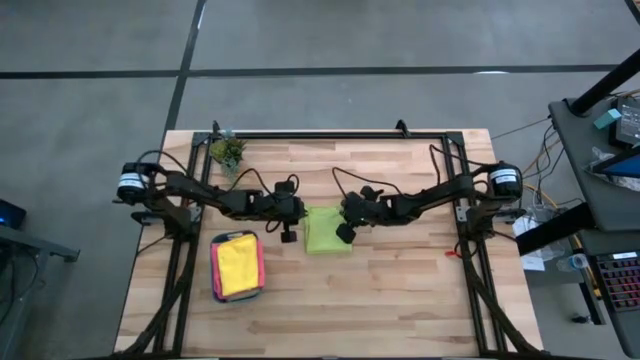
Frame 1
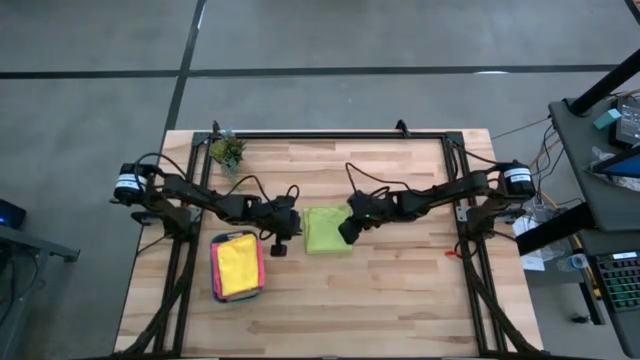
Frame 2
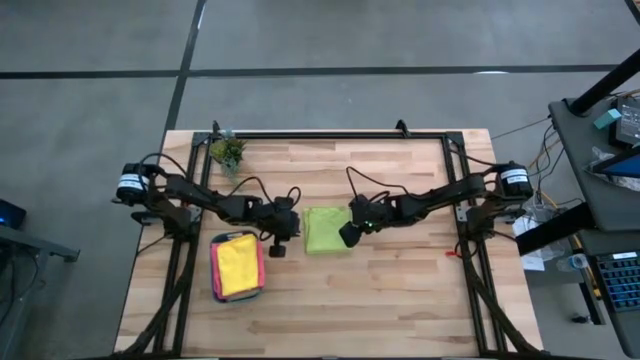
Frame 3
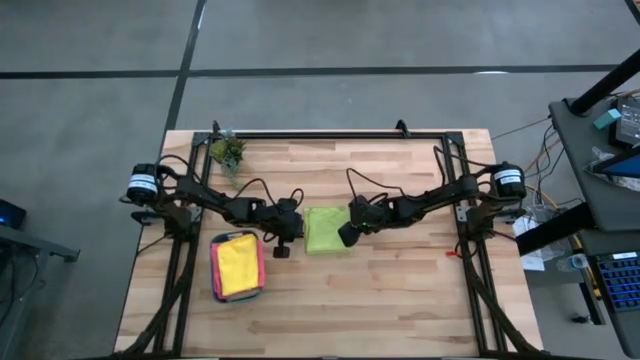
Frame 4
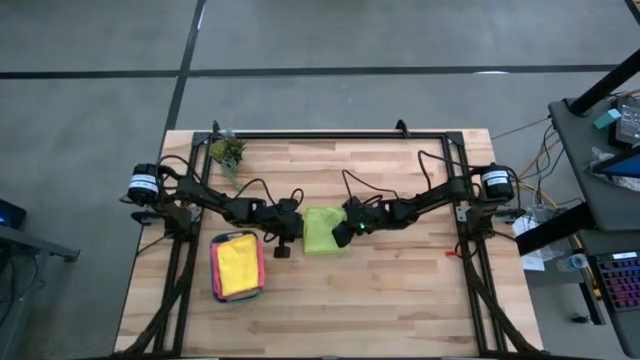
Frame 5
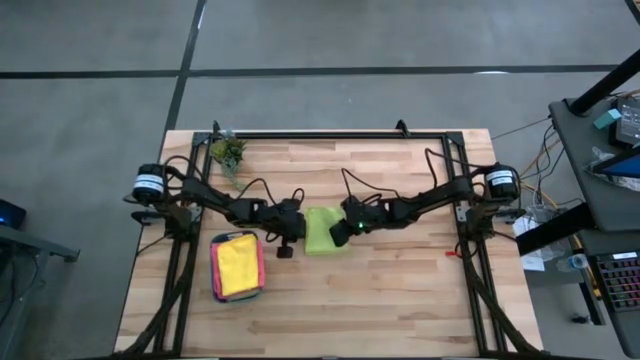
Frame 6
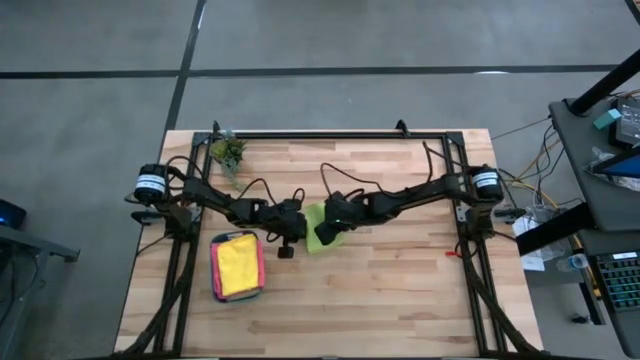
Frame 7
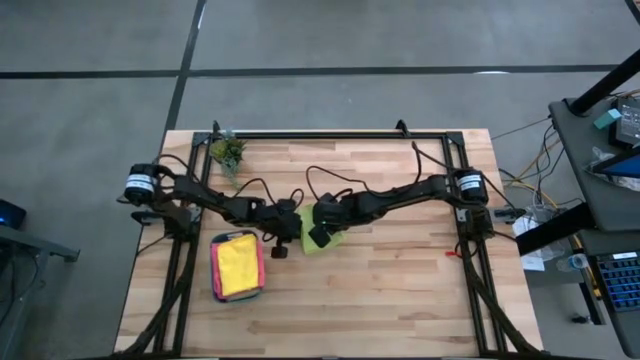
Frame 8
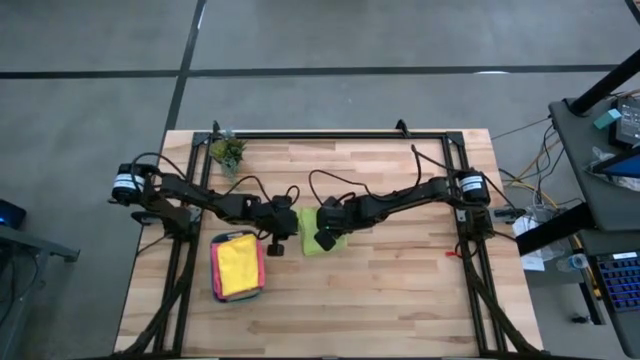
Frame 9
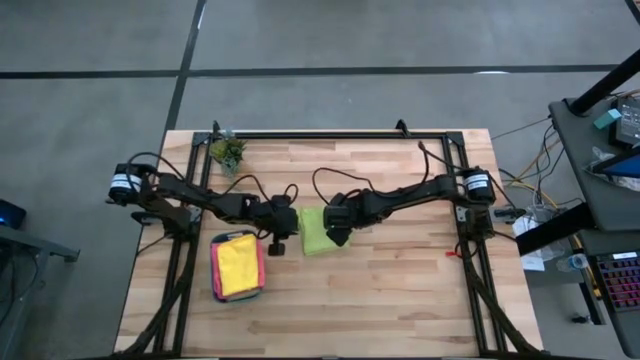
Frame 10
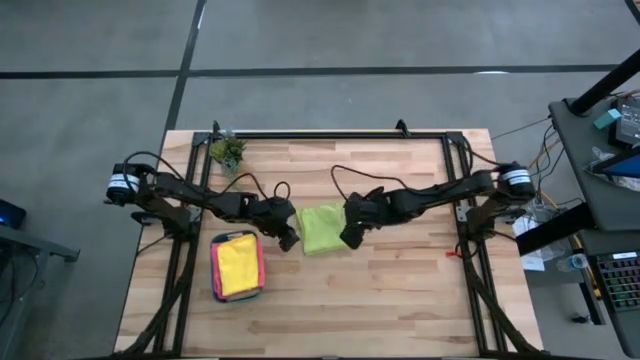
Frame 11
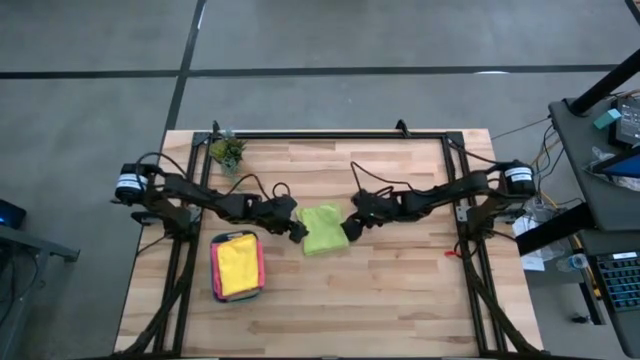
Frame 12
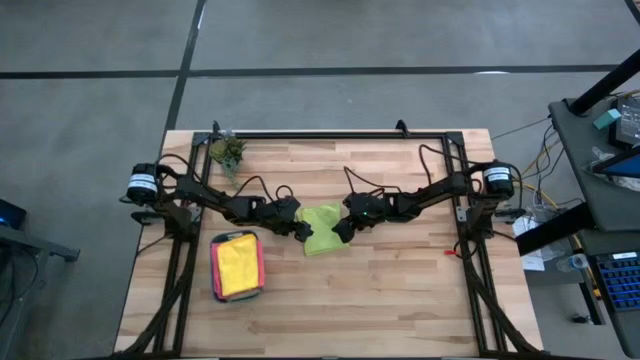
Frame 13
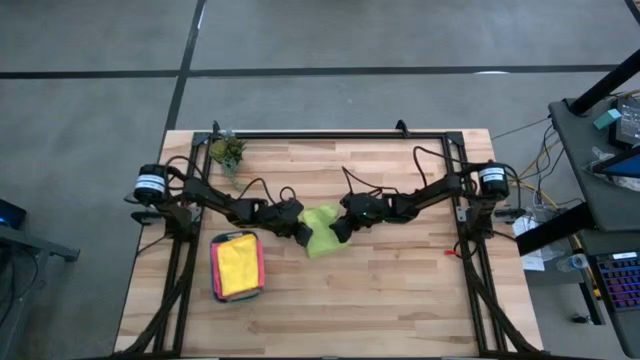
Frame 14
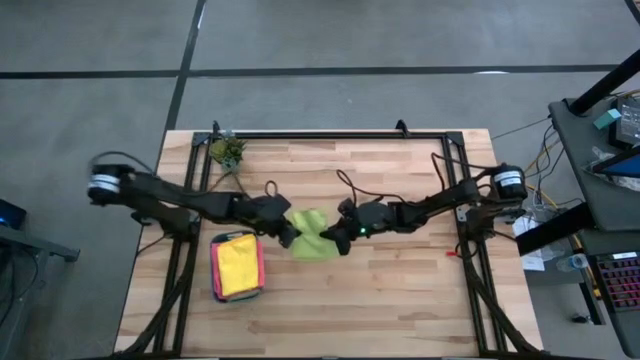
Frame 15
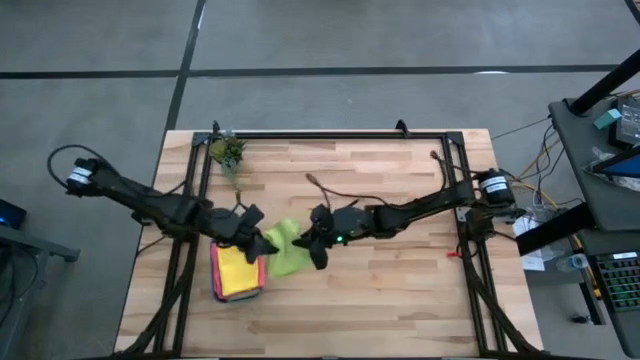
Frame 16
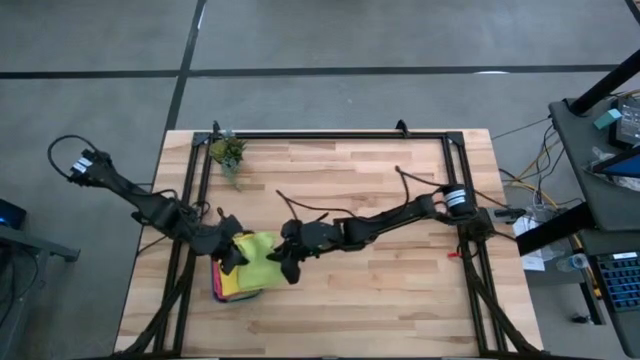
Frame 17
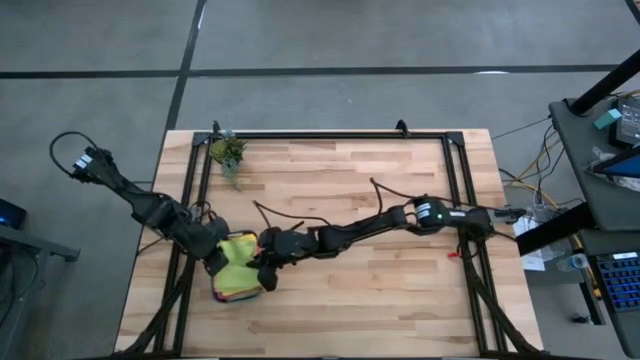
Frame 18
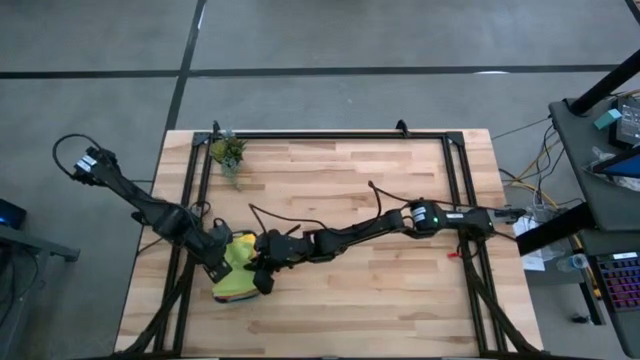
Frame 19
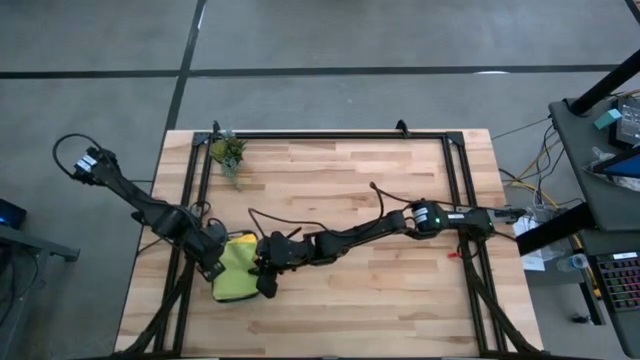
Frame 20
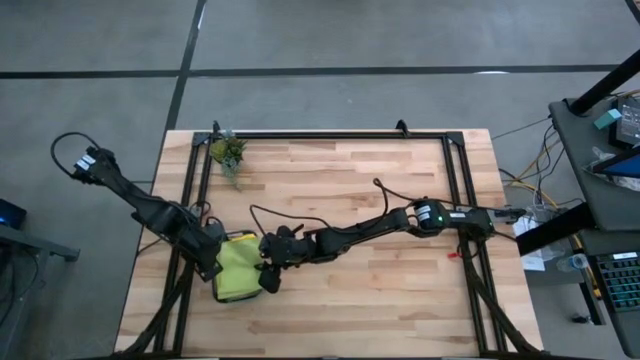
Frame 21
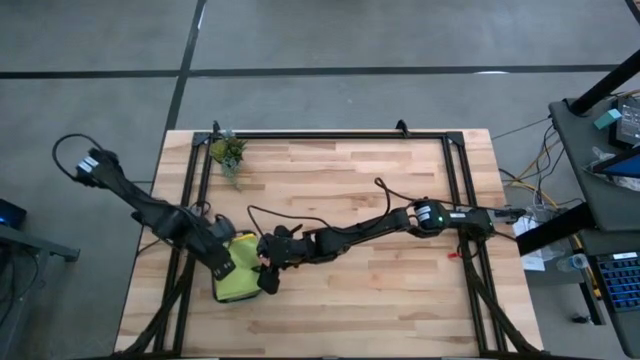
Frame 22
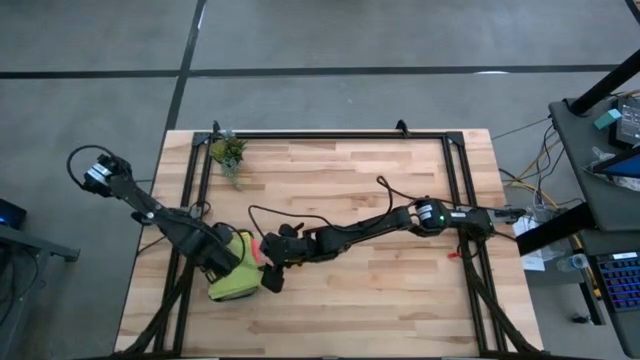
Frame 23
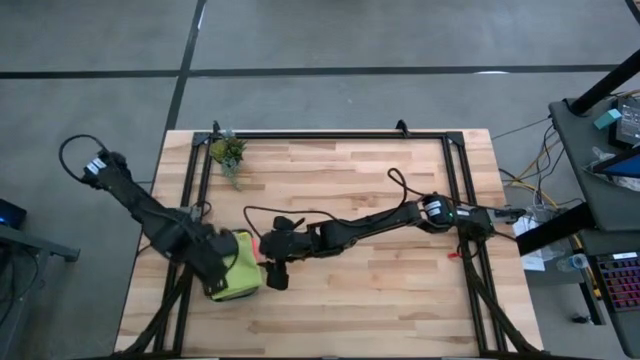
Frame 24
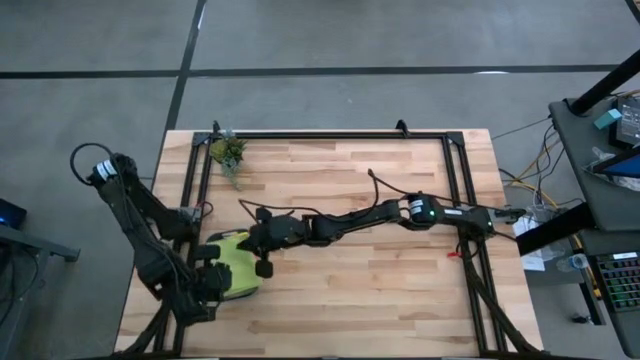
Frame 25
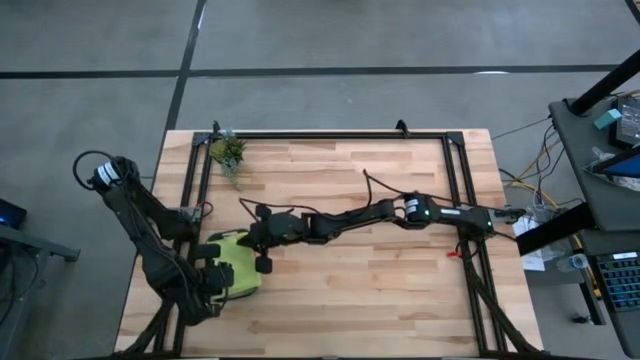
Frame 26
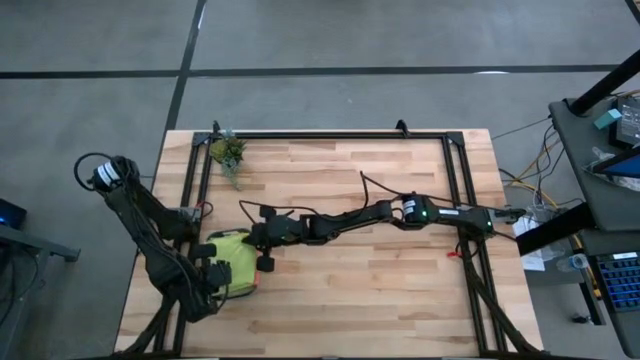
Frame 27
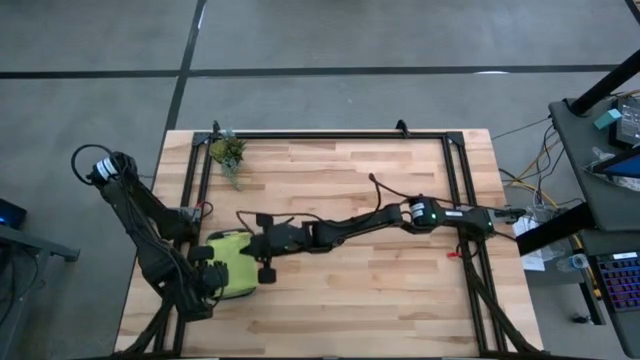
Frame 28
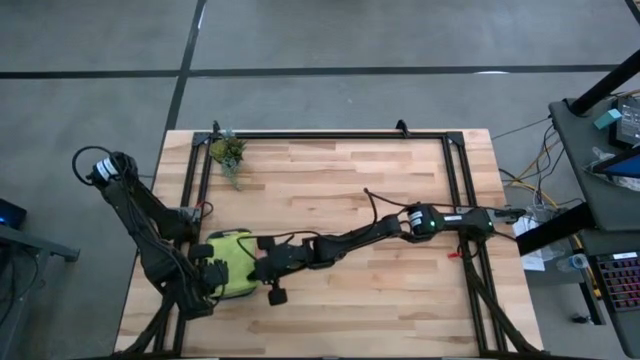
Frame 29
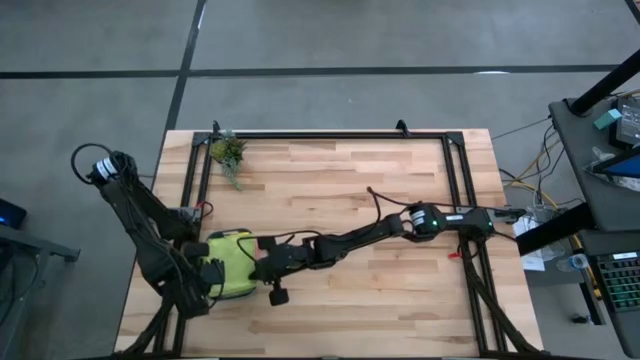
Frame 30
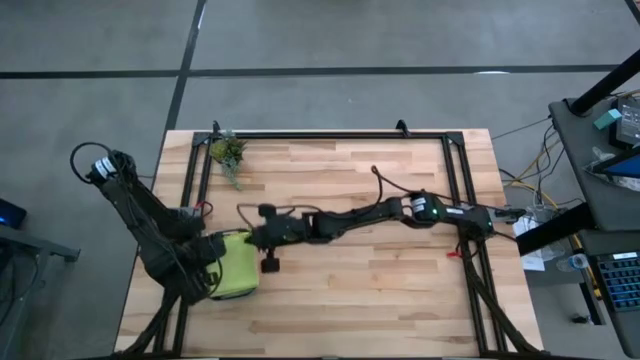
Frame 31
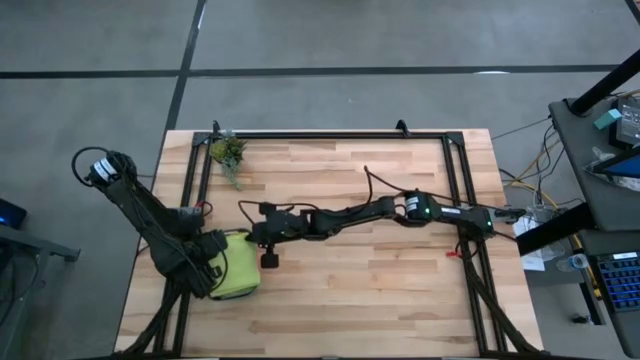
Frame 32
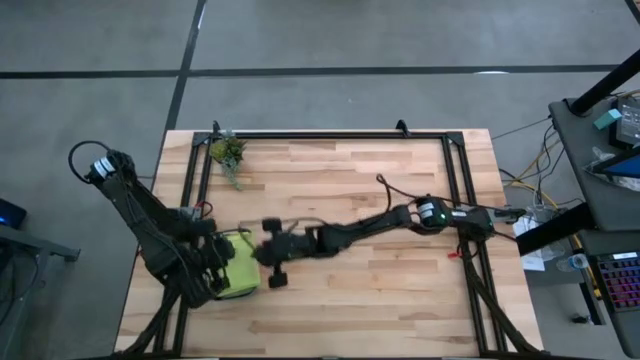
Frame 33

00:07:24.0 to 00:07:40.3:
Task: Fold microfiber towels
Put the green microfiber cloth into the blue bin

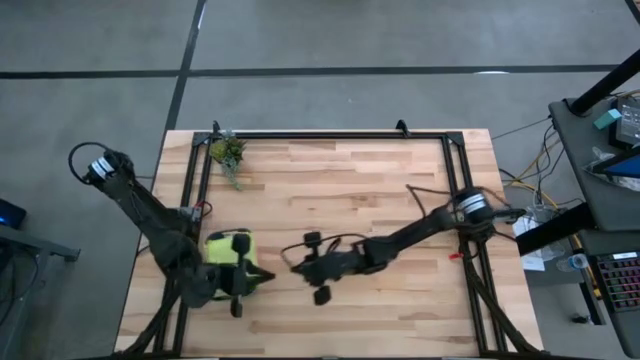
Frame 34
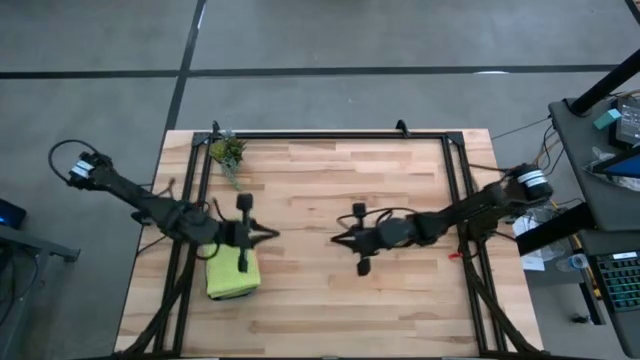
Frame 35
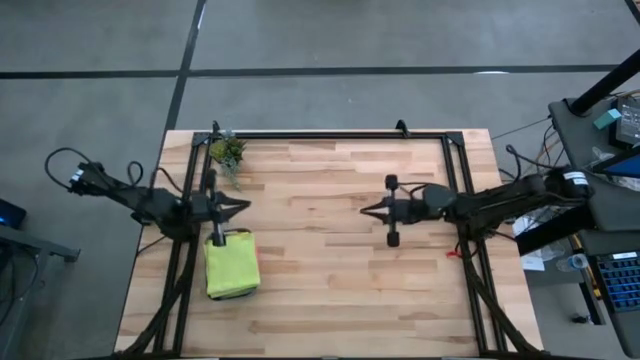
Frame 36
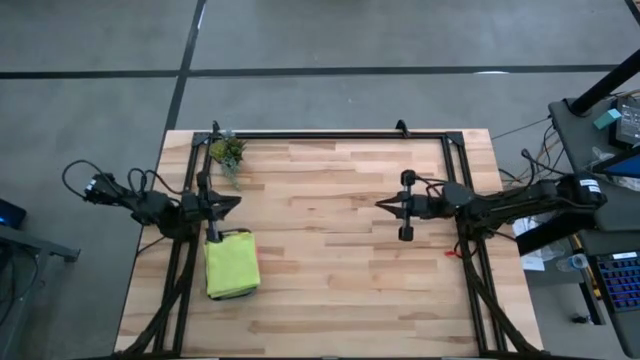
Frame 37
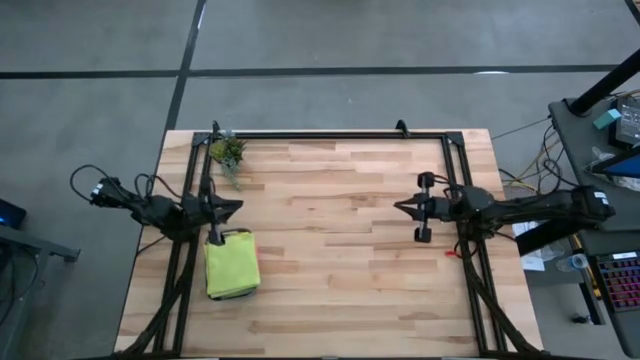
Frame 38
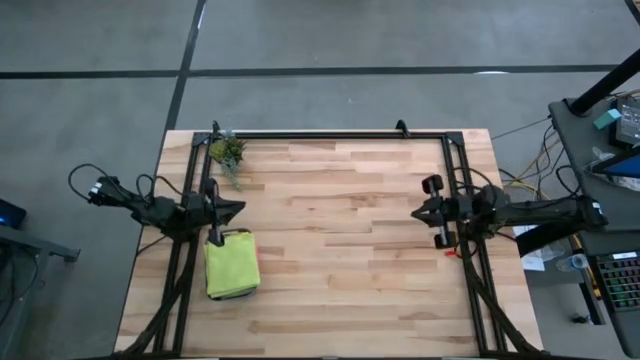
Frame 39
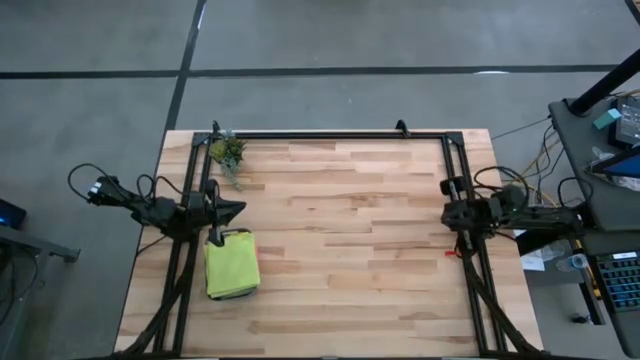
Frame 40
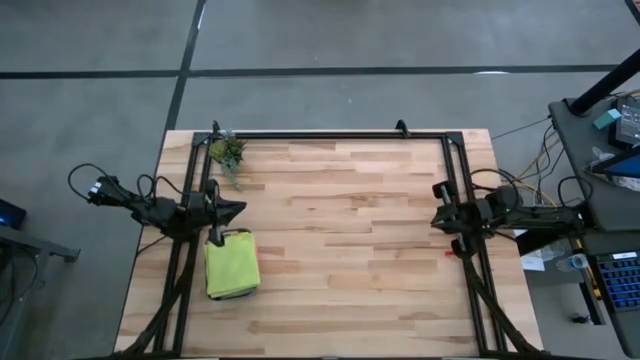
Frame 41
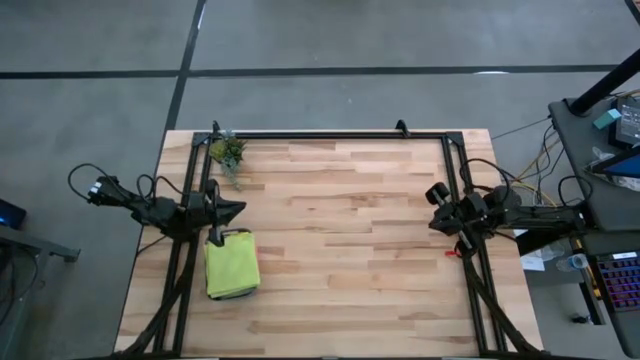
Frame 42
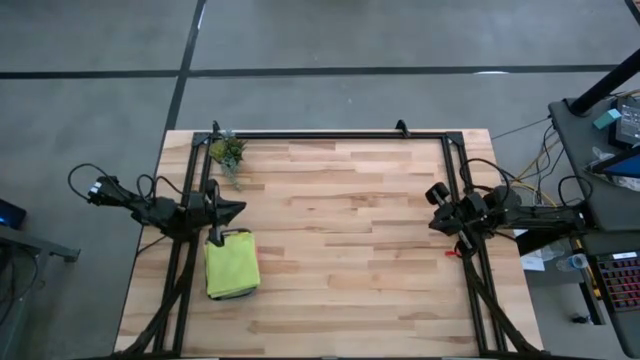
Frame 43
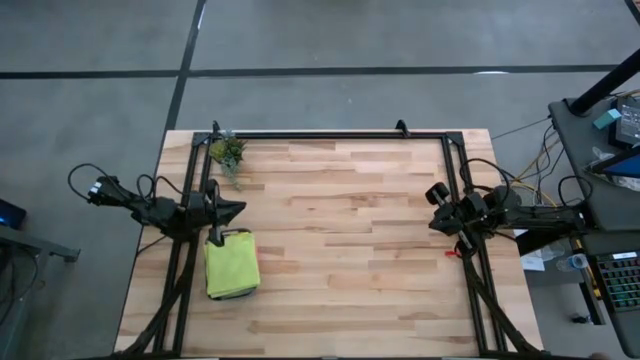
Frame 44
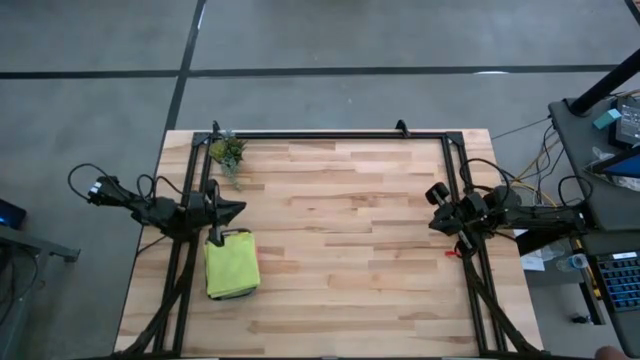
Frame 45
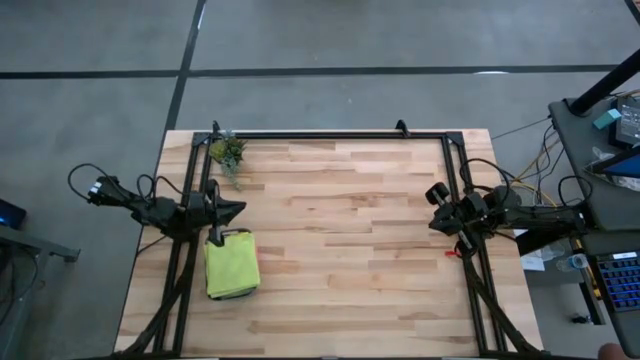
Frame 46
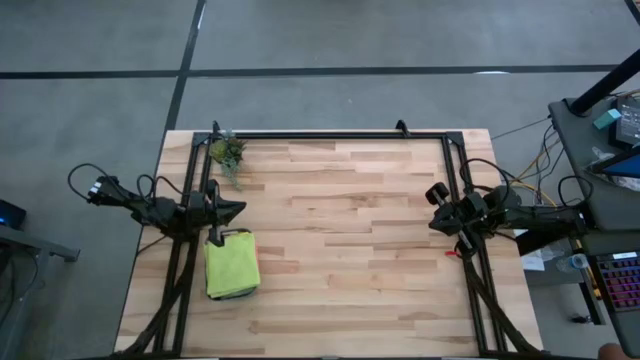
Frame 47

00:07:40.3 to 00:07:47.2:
Return to Home Position
